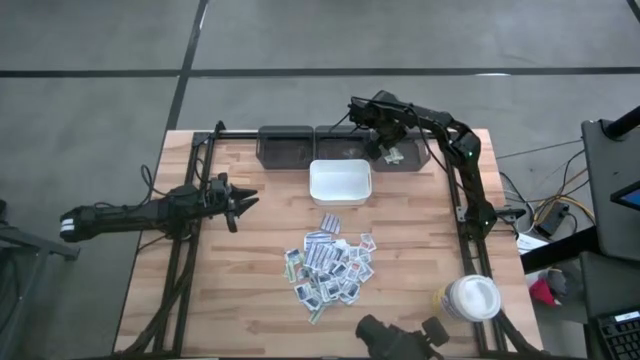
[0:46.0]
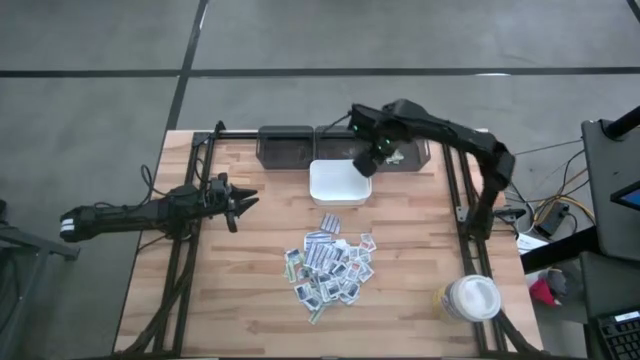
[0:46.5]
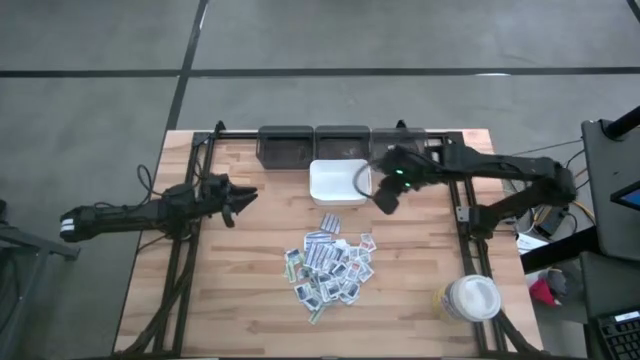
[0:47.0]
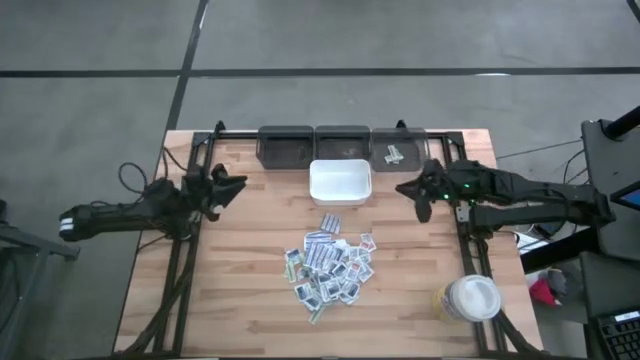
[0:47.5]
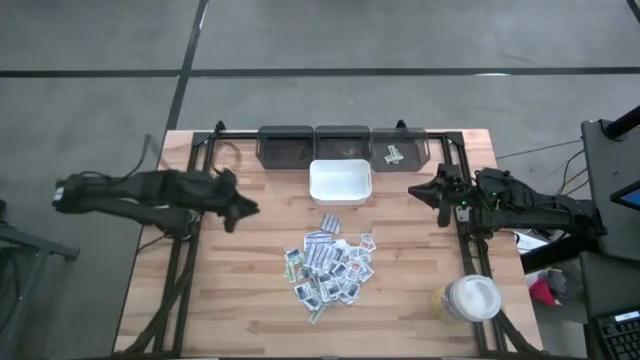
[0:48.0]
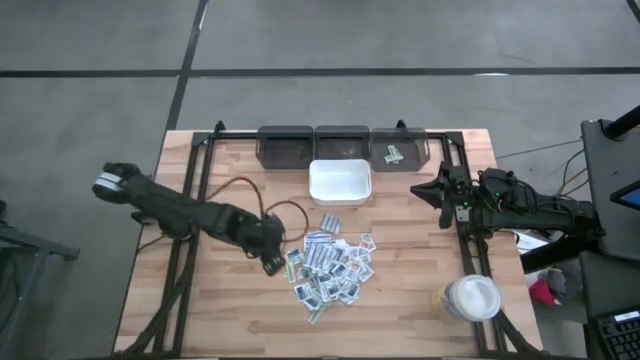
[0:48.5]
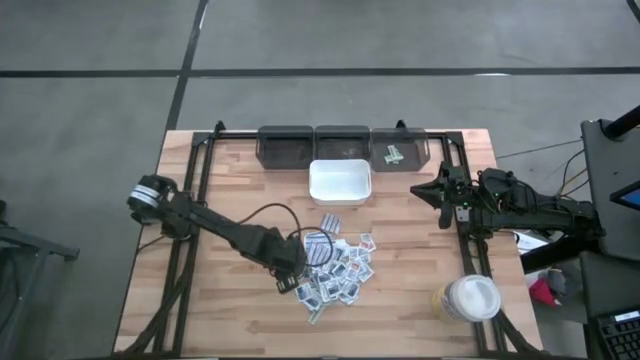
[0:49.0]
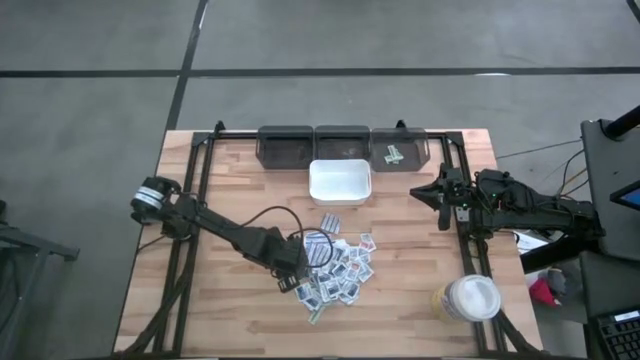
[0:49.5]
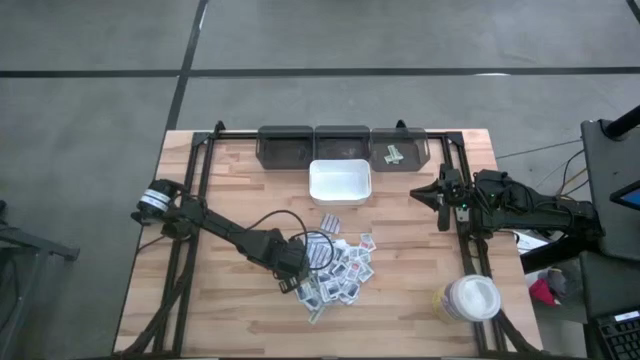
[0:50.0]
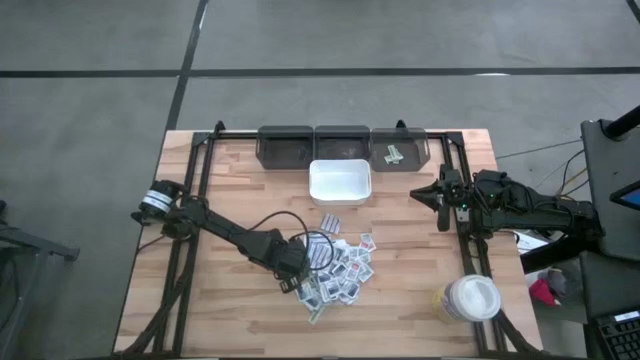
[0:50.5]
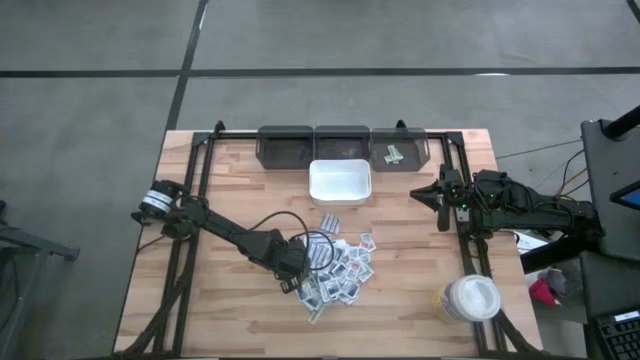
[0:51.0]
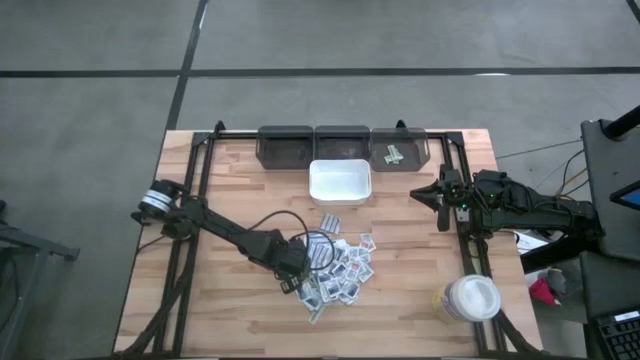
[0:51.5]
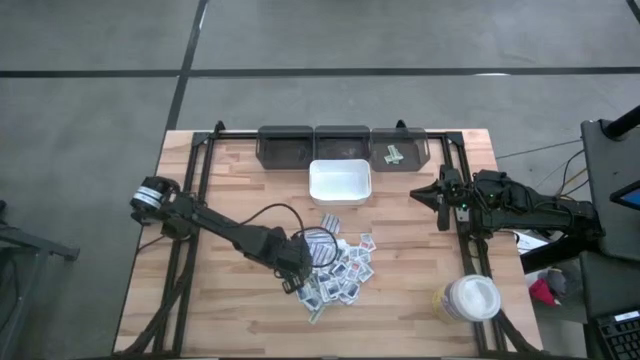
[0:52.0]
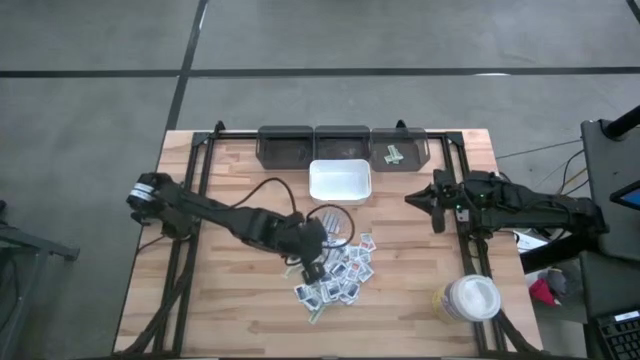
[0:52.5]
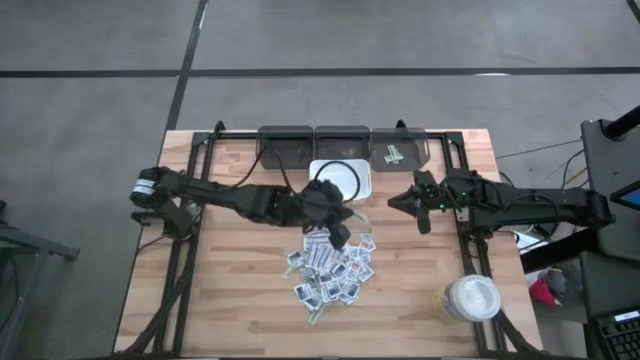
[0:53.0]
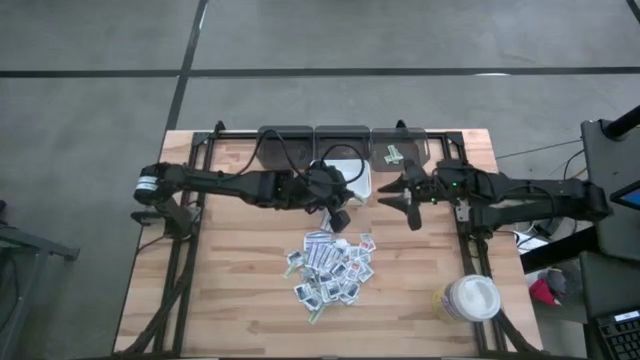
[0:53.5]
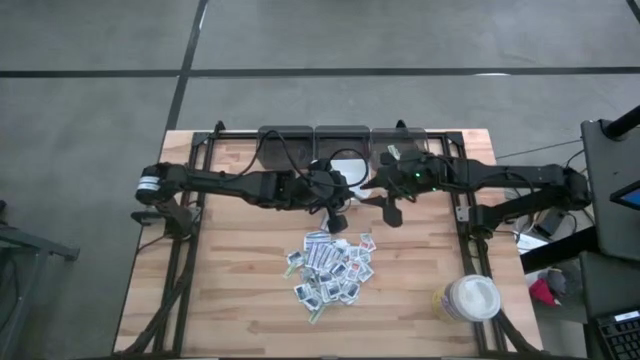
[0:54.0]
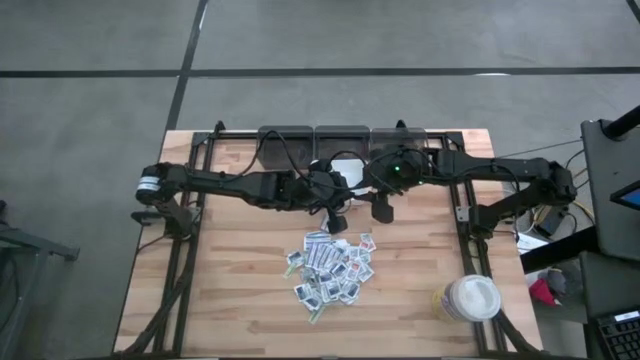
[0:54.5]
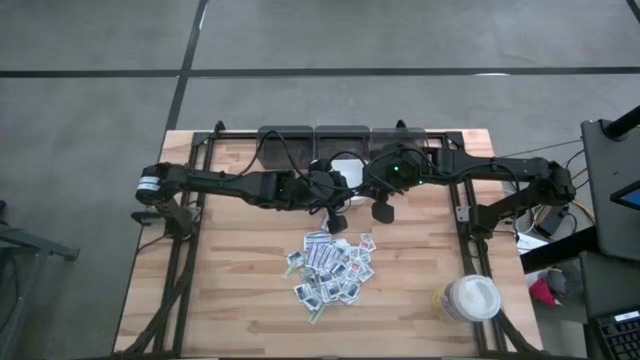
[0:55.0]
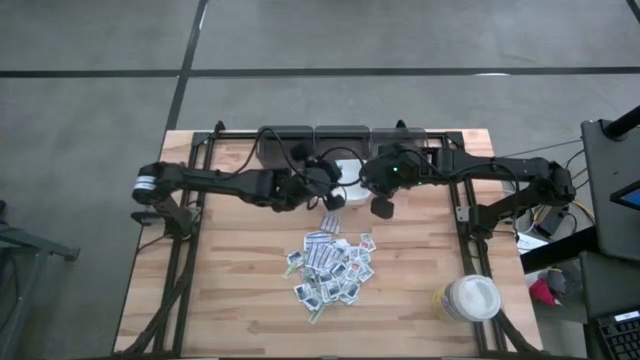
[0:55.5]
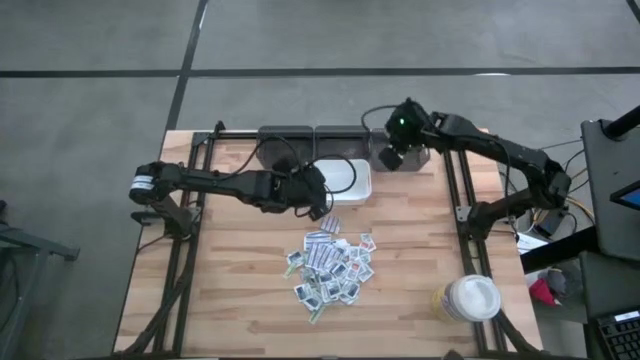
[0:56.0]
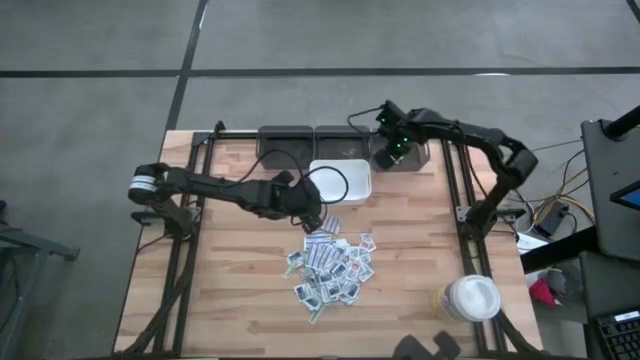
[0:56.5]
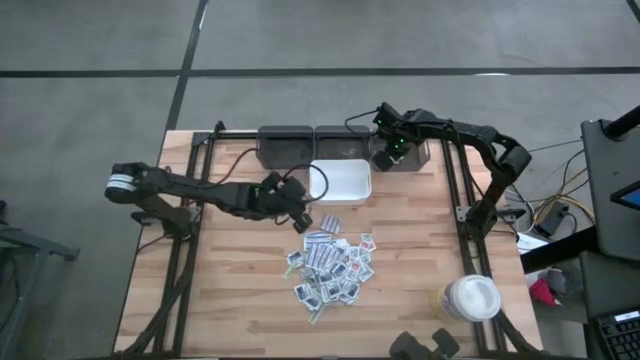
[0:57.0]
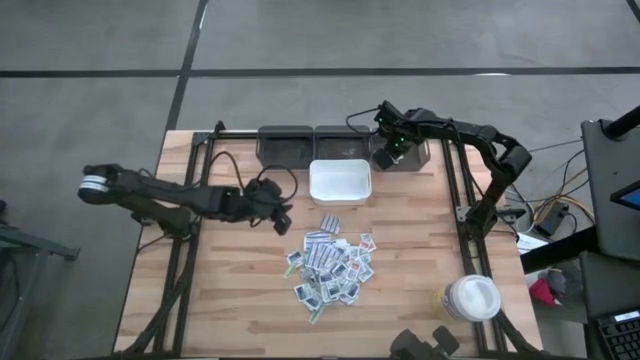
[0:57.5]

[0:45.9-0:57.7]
Task: Pick & Place First Aid Supplies
Put the green bandage pack into the right gray bin

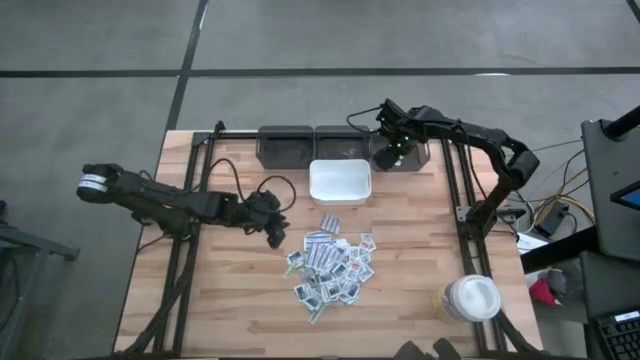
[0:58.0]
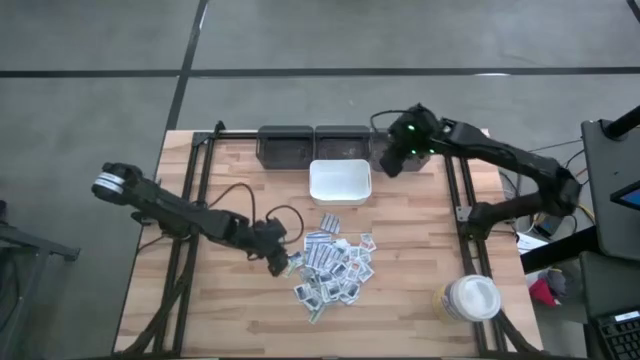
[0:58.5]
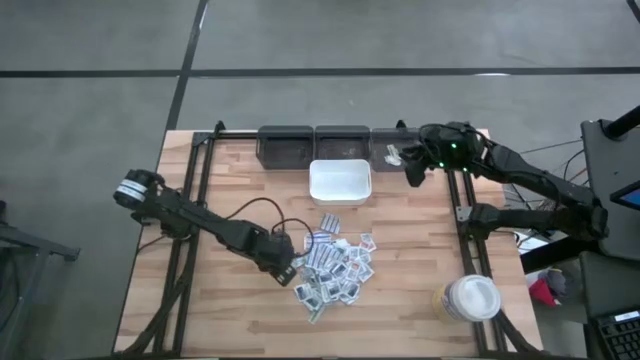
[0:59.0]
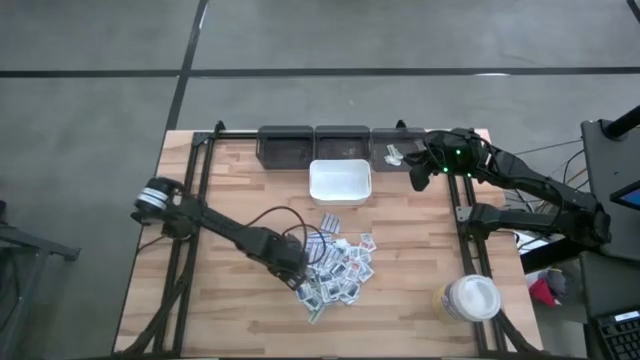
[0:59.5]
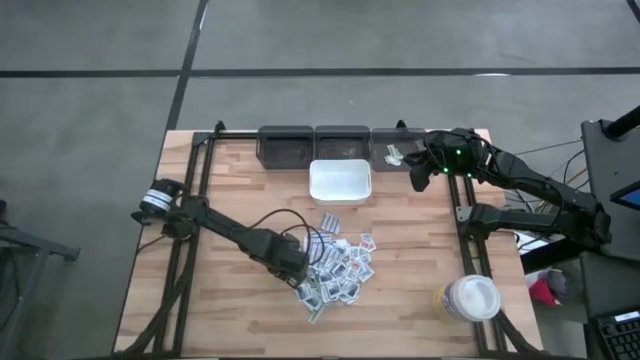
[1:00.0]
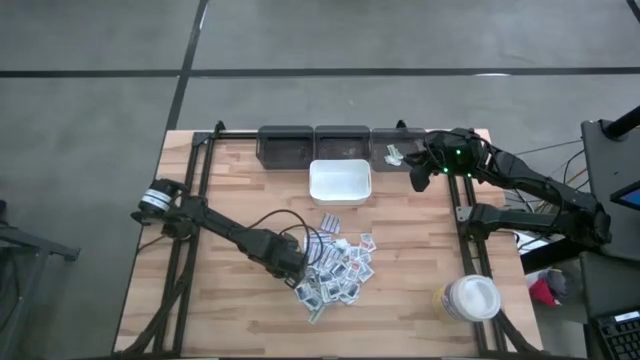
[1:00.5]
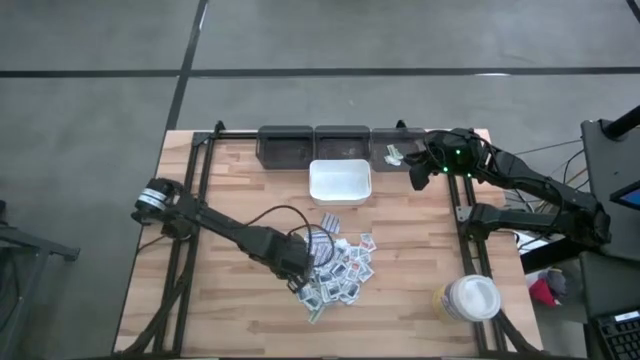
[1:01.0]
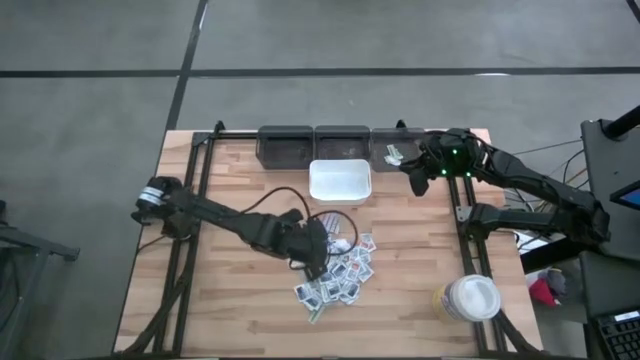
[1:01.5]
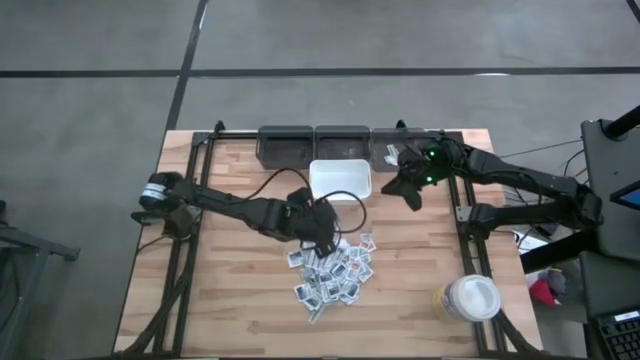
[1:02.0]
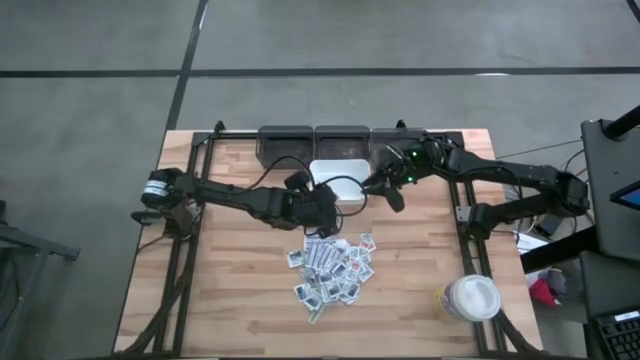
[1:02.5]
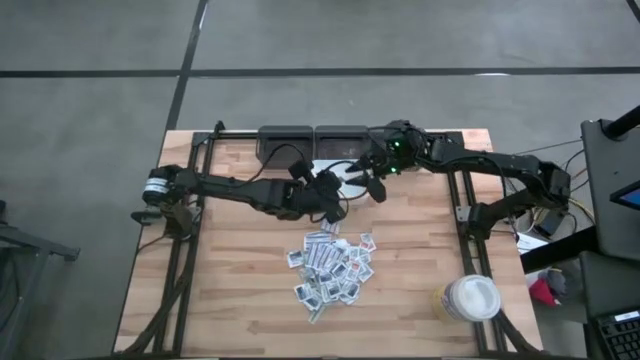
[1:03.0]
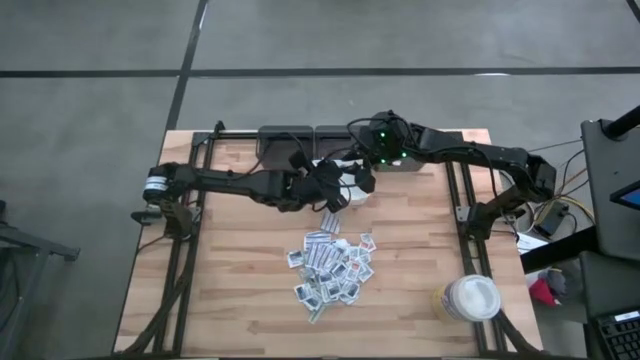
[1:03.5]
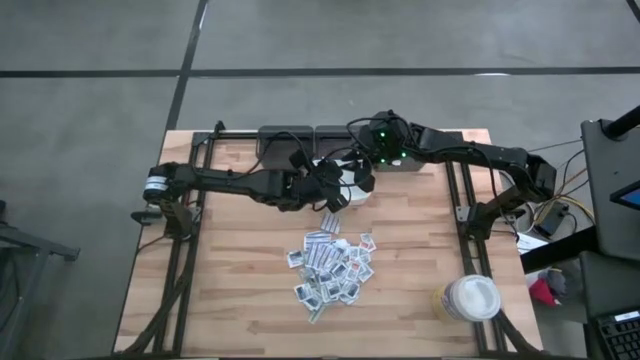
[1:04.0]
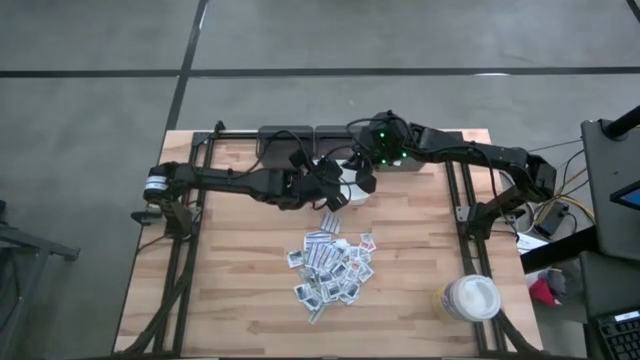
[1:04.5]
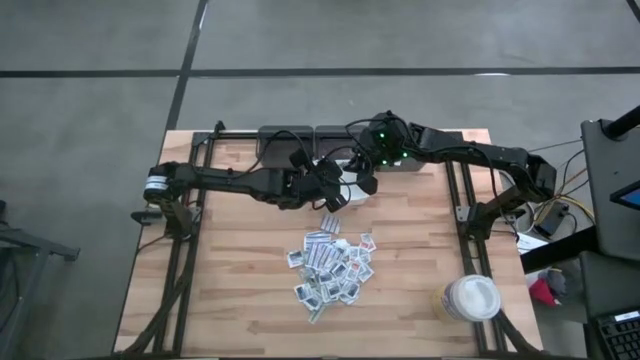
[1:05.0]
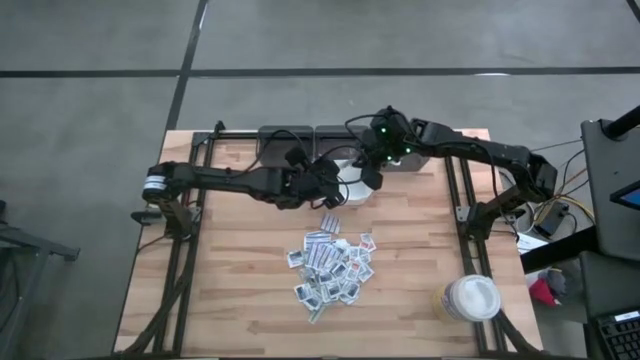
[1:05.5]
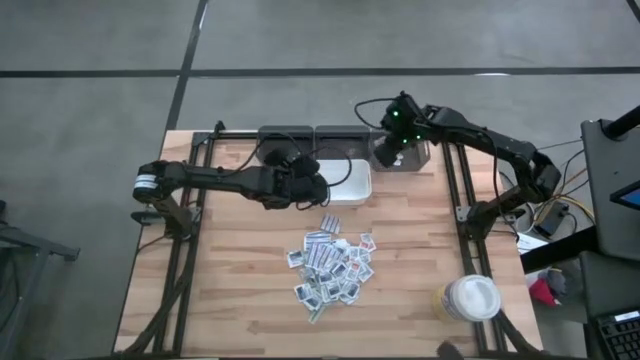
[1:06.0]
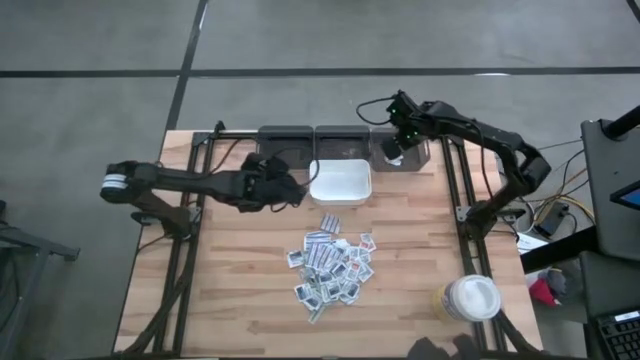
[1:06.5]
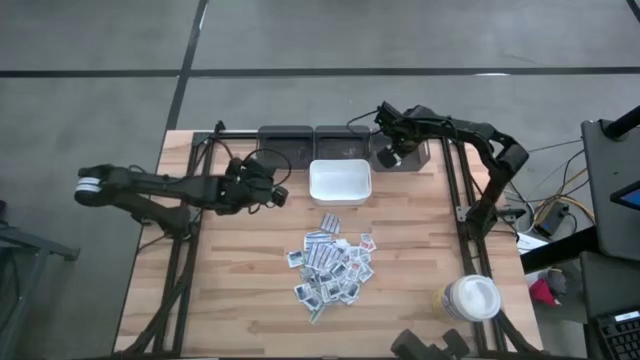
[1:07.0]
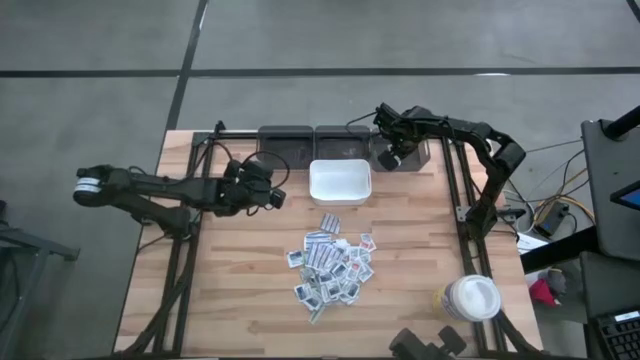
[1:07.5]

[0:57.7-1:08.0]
Put the green bandage pack into the right gray bin

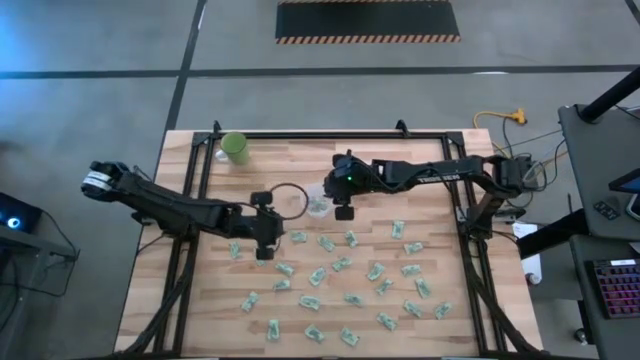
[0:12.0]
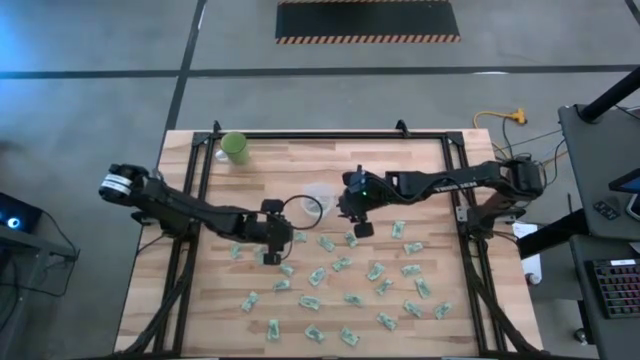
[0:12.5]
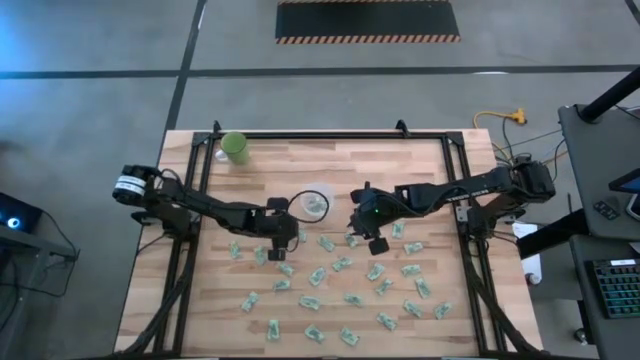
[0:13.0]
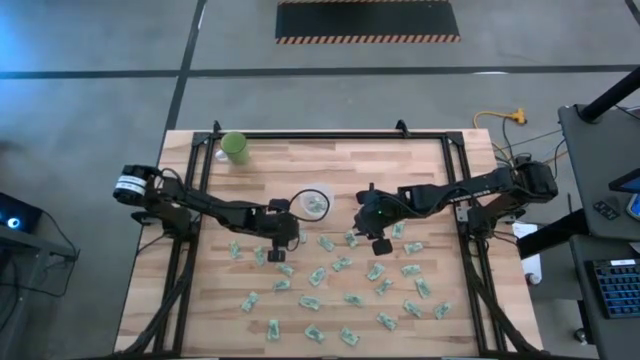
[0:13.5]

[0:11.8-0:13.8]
Task: Pick and place Stevia / Truvia into bins
Put the green stevia packet into the transparent container
